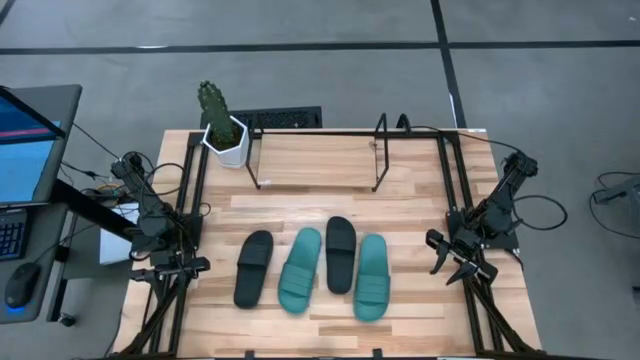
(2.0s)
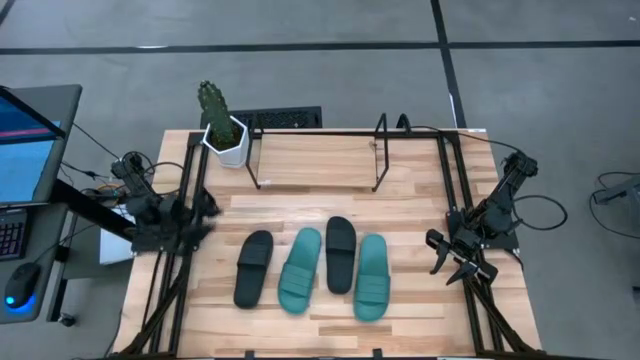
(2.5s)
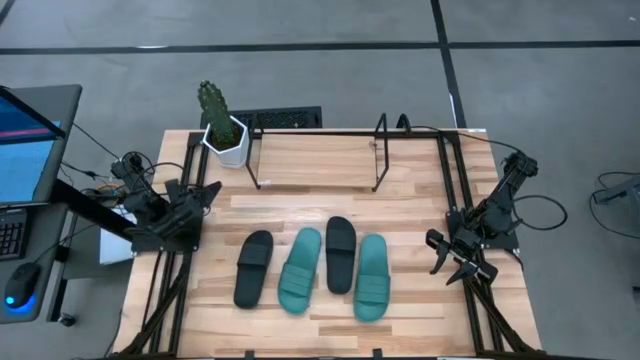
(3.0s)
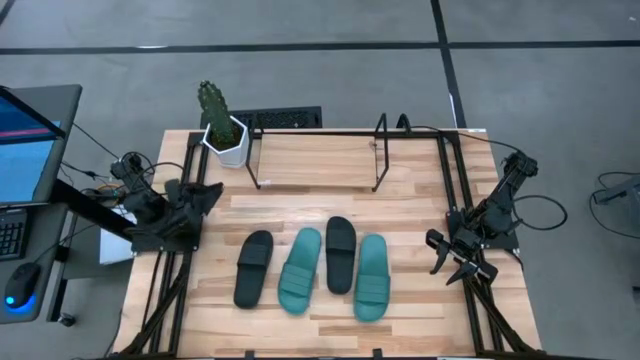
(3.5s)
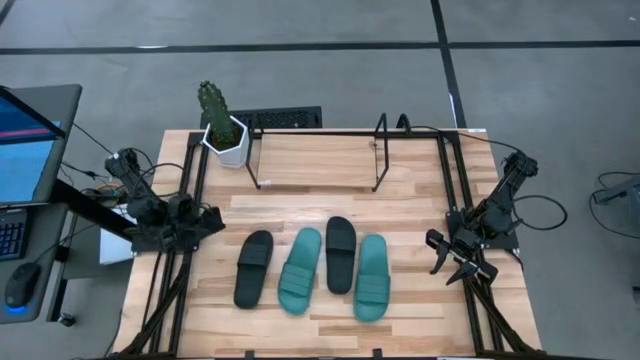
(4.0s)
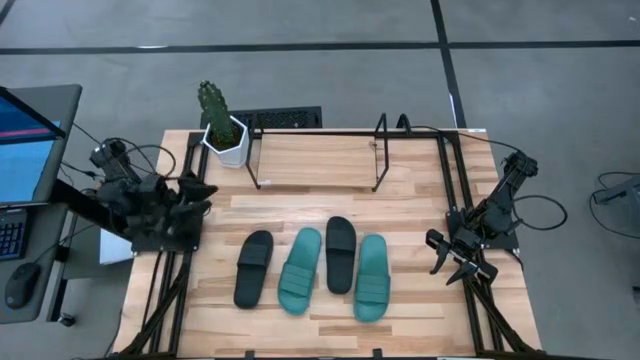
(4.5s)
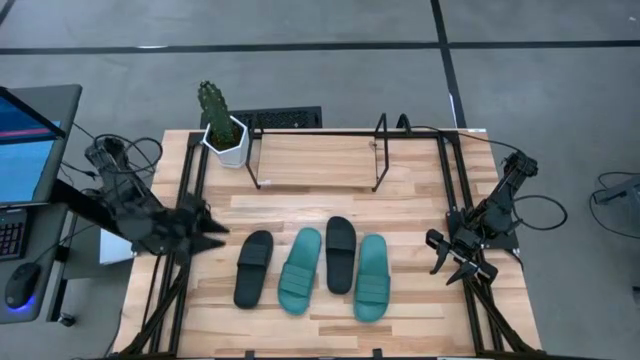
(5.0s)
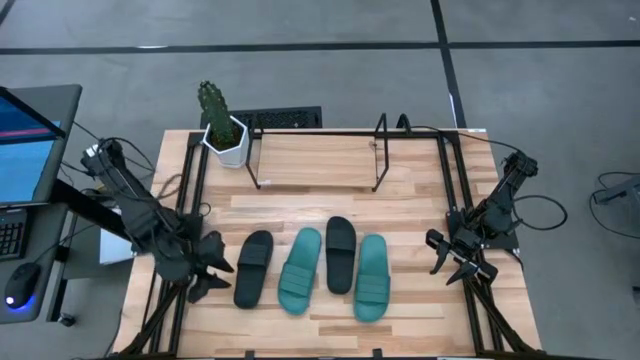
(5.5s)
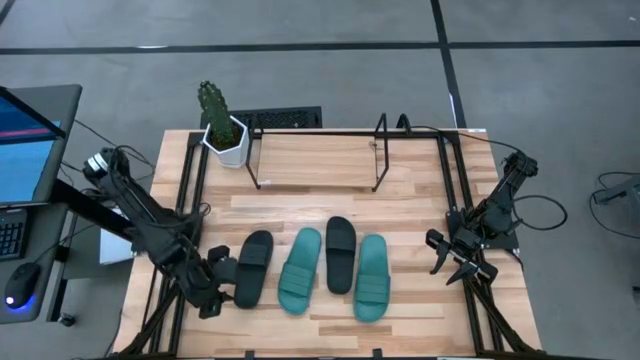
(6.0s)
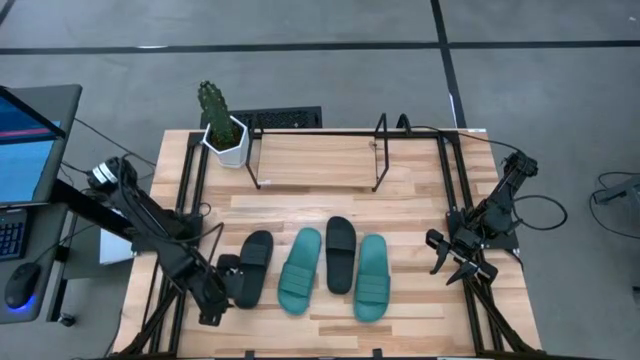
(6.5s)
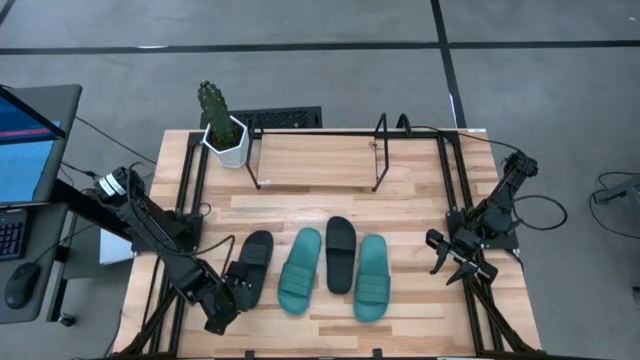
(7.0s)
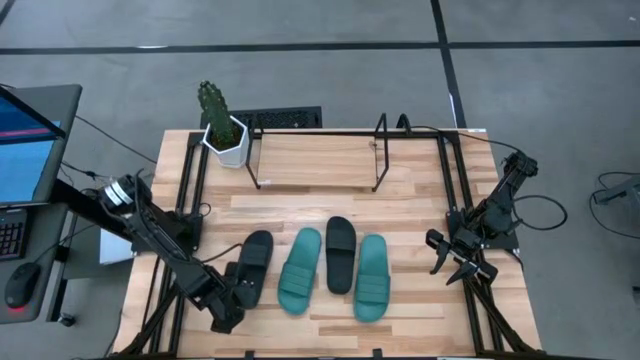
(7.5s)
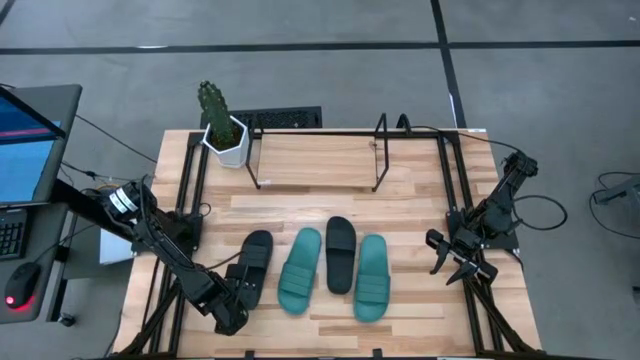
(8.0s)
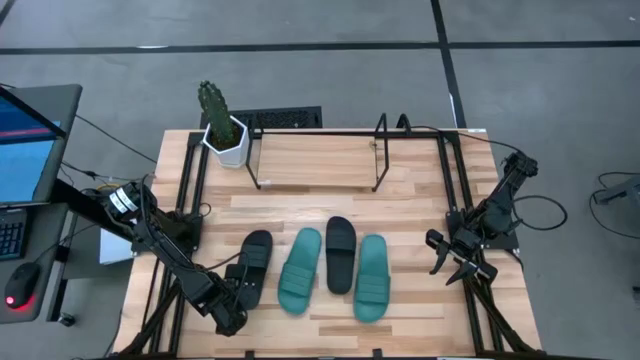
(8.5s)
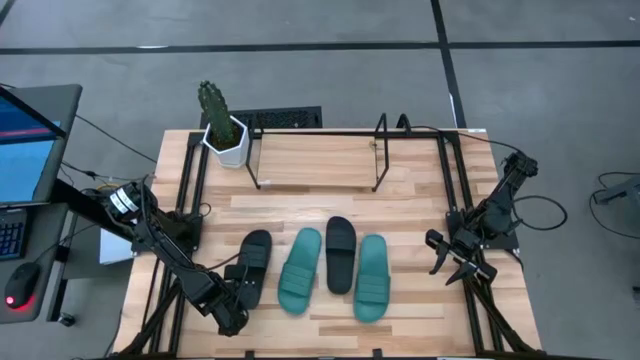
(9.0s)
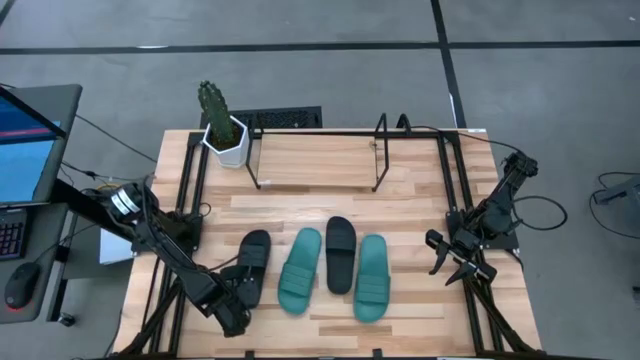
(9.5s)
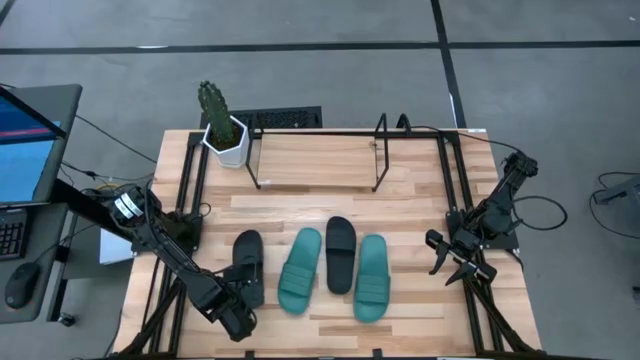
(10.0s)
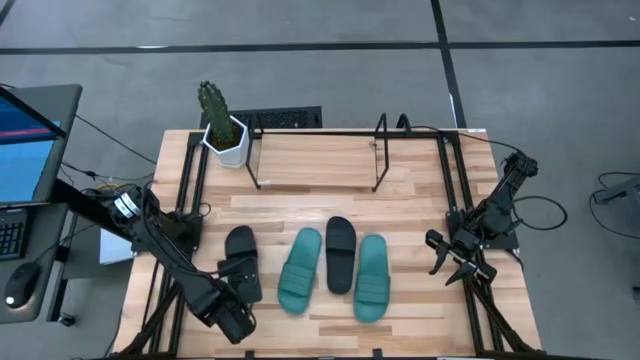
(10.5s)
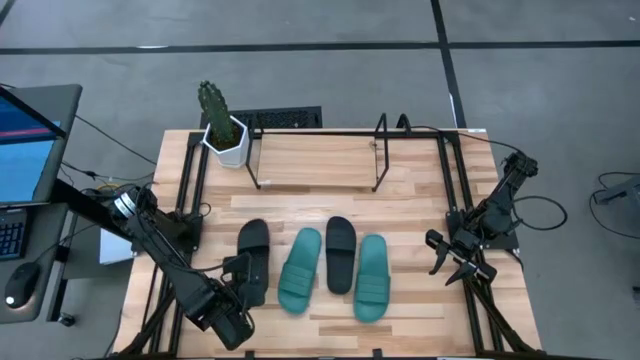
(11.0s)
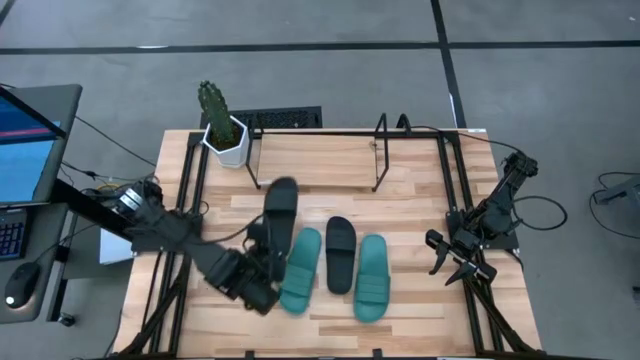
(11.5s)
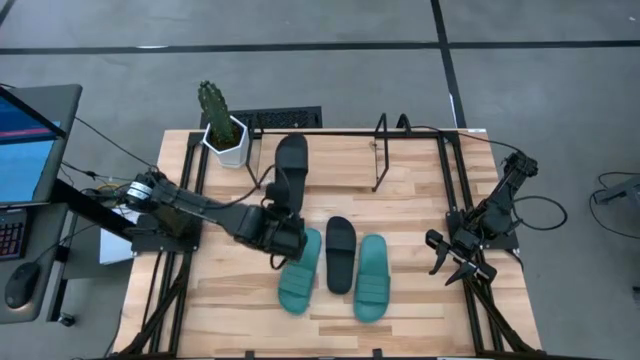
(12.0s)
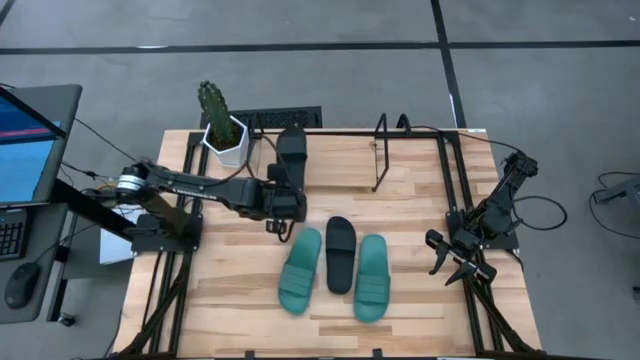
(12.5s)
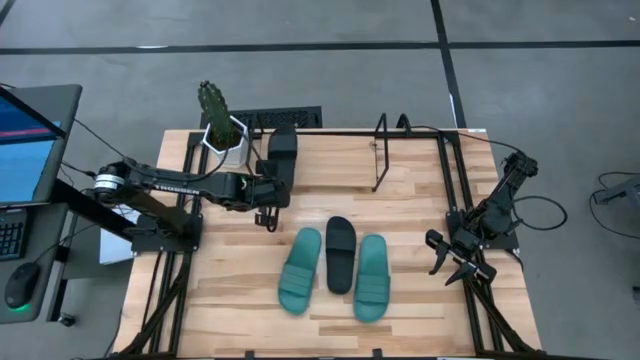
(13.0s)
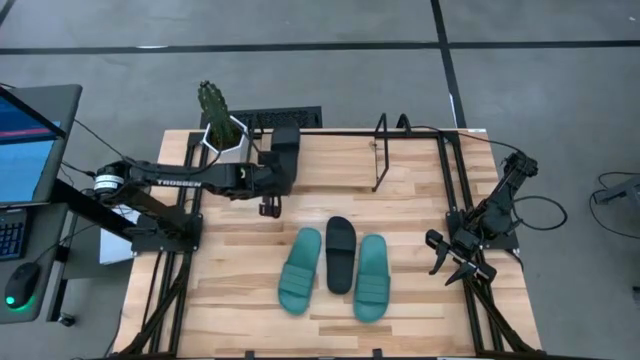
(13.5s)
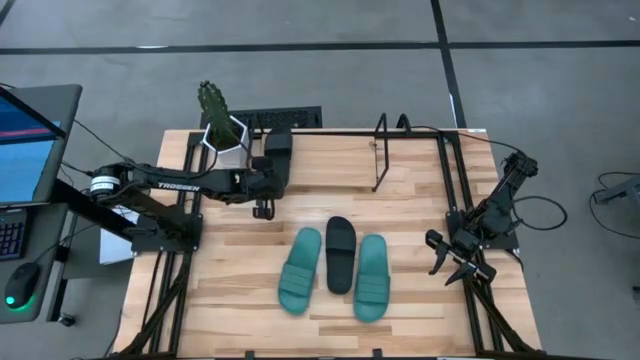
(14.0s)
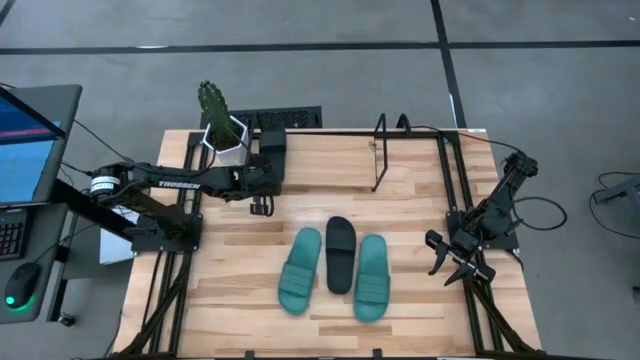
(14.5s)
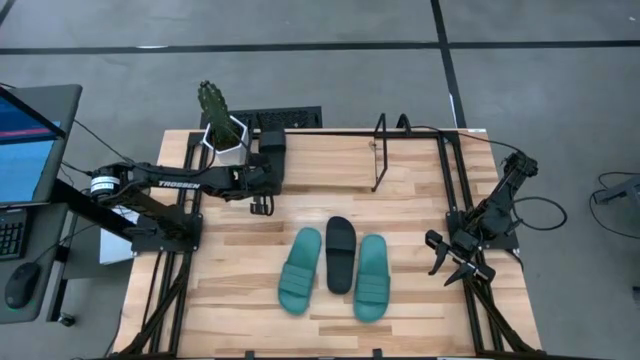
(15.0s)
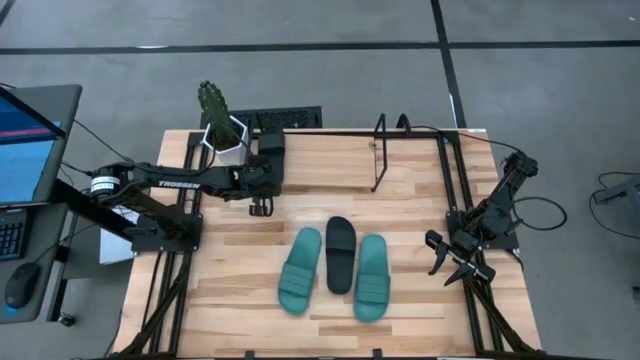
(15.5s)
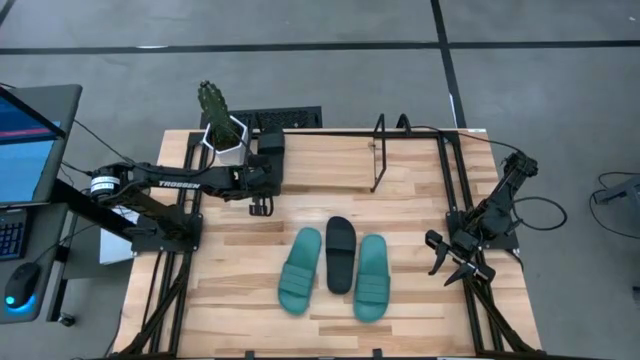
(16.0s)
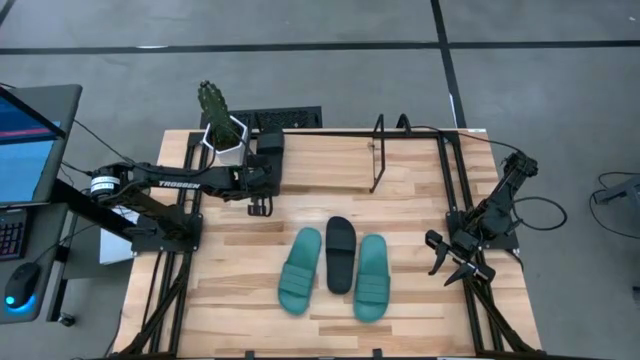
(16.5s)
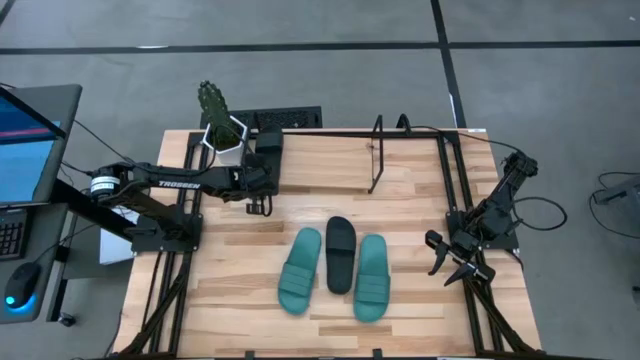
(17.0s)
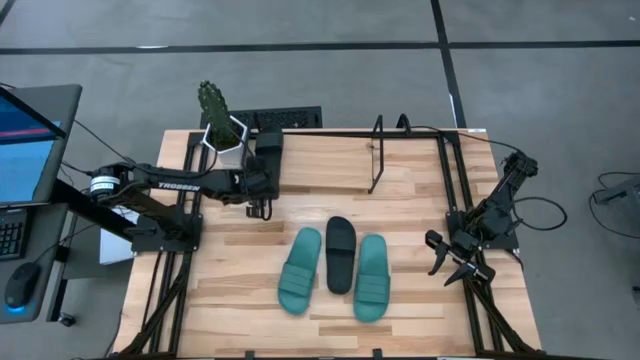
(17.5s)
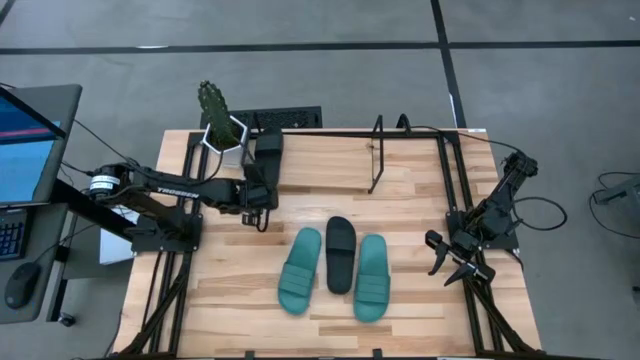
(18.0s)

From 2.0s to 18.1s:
Task: Pick and place slides into the shelf
Put the left black slide on the shelf

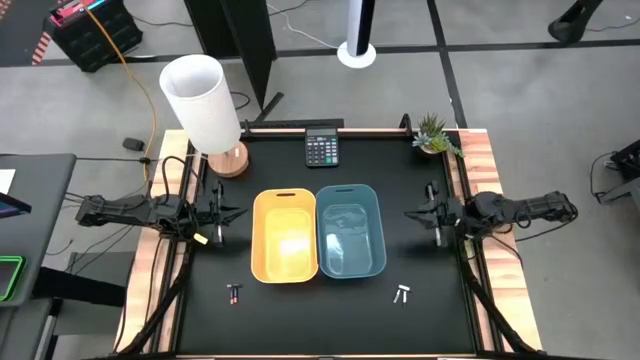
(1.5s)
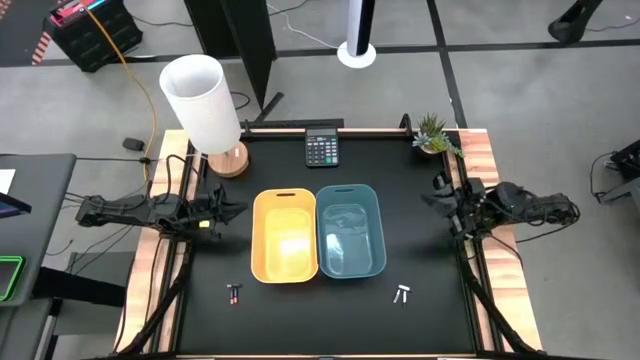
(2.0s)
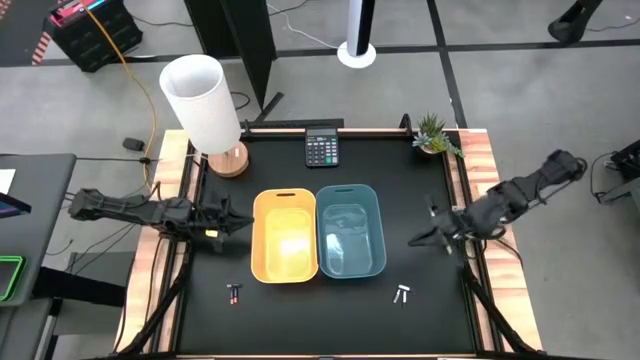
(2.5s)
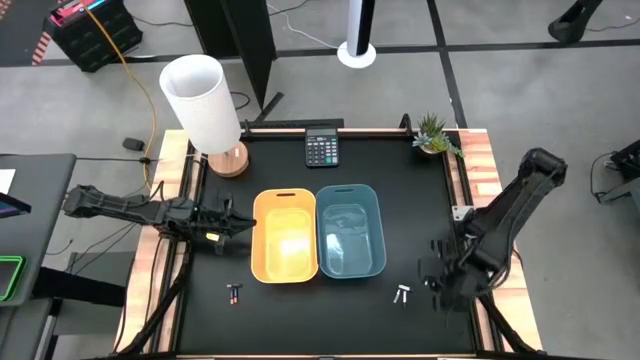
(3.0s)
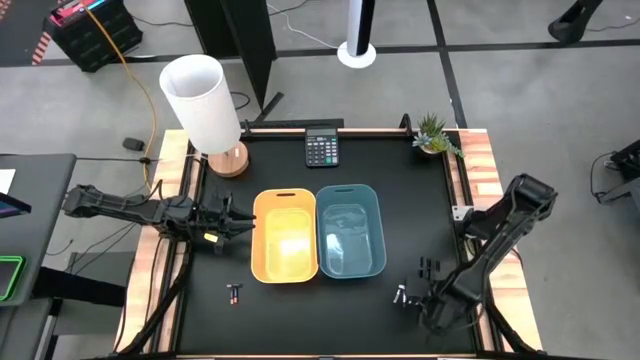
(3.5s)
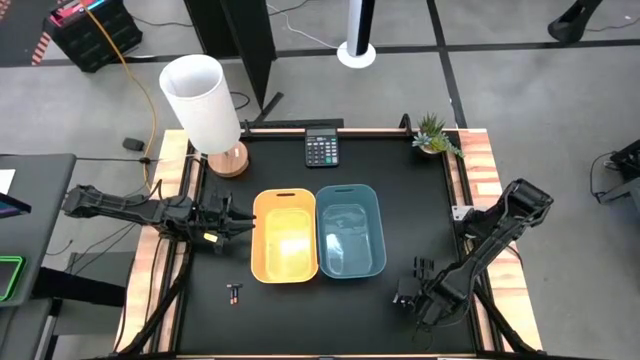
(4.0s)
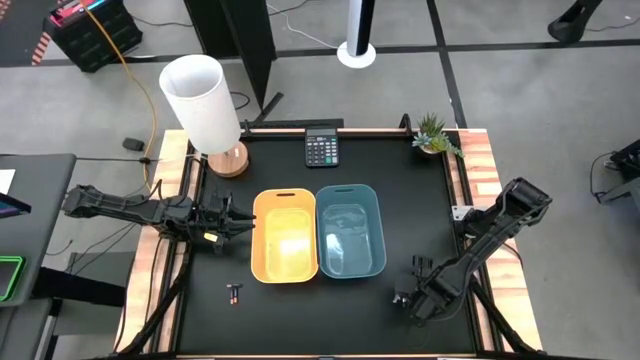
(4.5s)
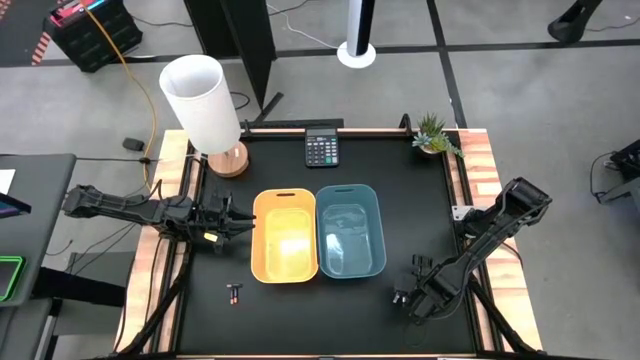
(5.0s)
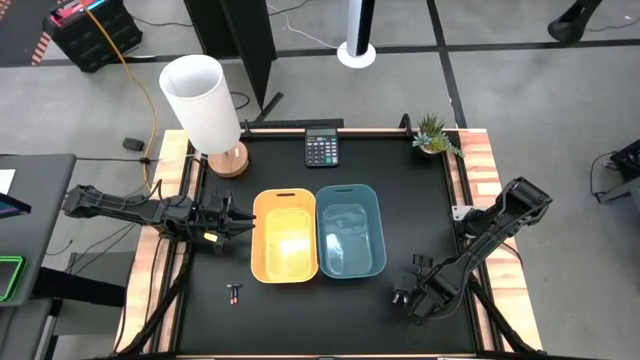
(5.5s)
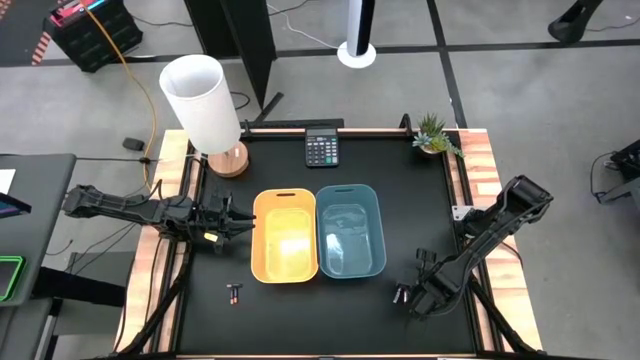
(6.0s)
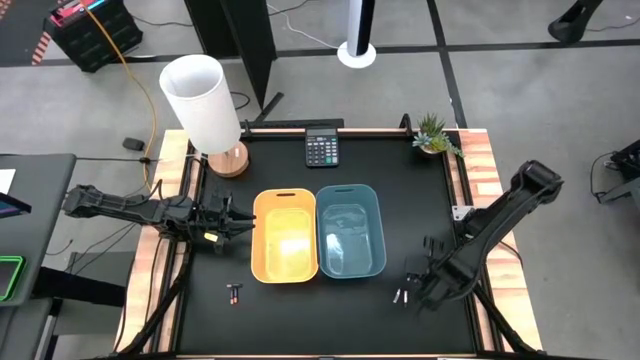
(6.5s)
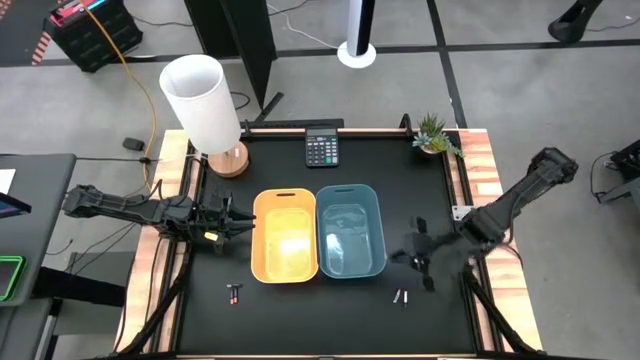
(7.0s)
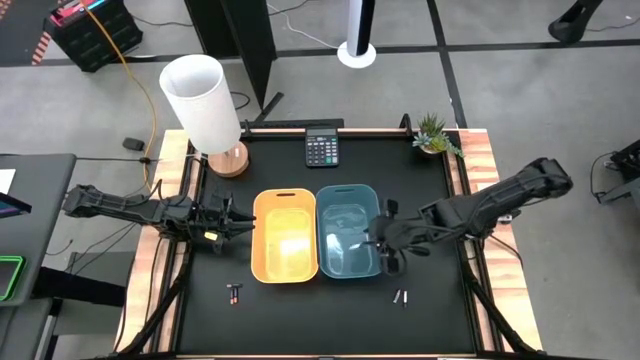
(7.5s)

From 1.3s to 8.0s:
Task: Sort batteries
Put the top silver battery into the blue bin
